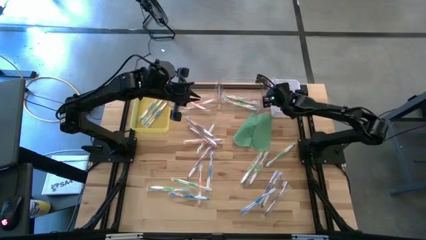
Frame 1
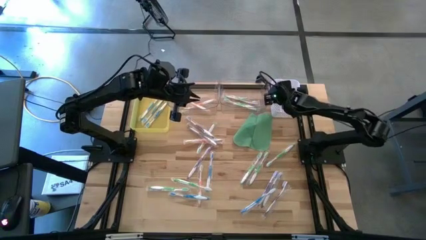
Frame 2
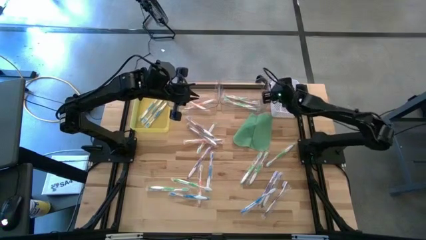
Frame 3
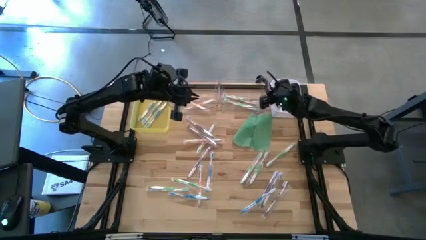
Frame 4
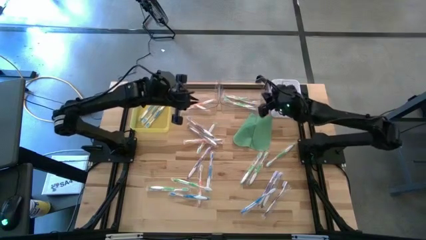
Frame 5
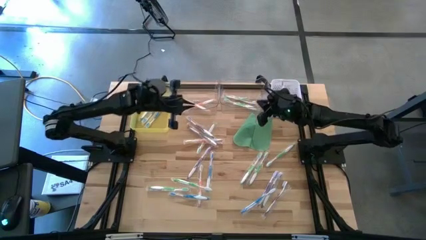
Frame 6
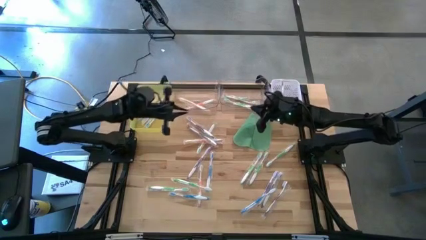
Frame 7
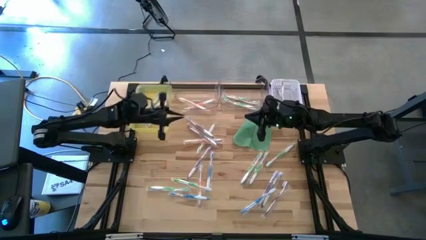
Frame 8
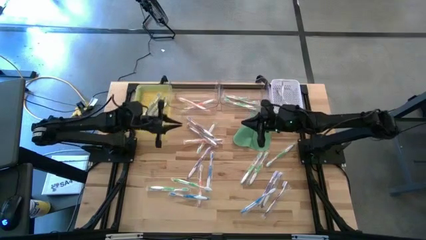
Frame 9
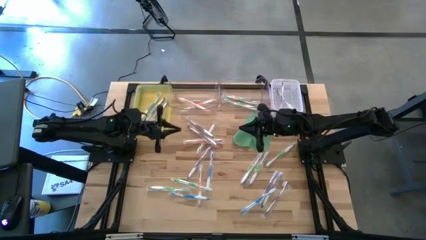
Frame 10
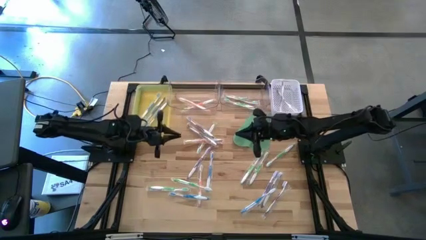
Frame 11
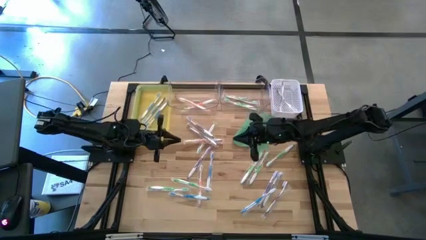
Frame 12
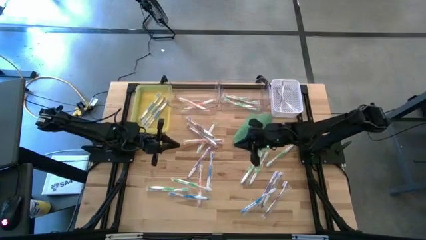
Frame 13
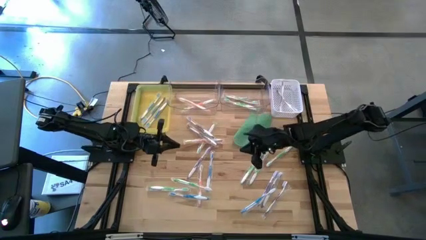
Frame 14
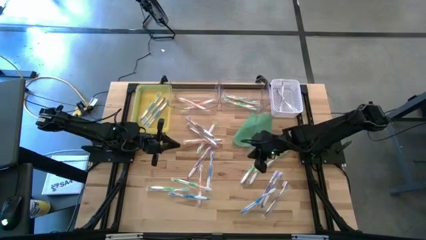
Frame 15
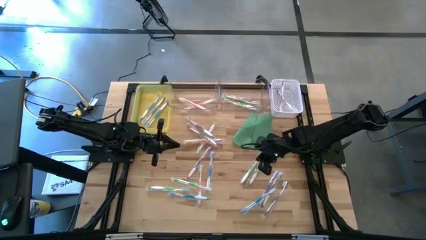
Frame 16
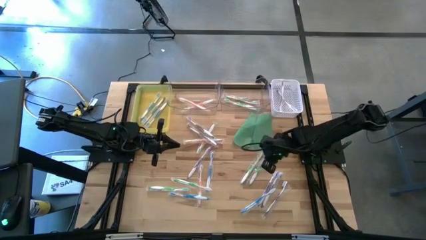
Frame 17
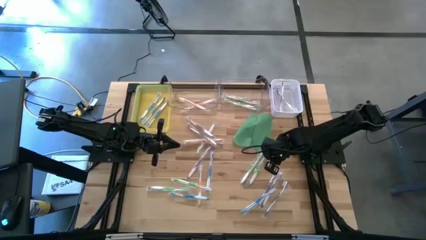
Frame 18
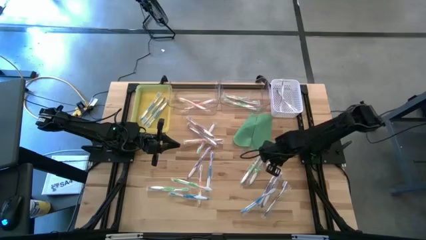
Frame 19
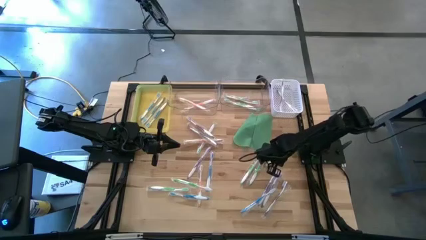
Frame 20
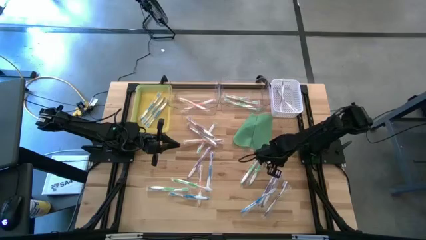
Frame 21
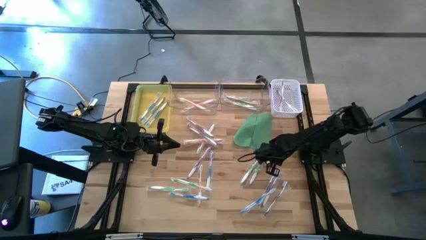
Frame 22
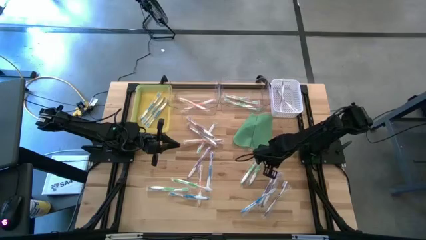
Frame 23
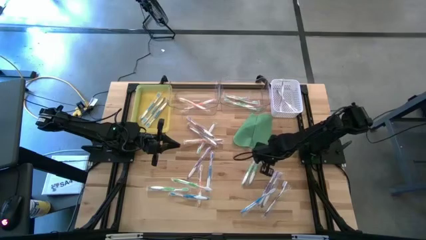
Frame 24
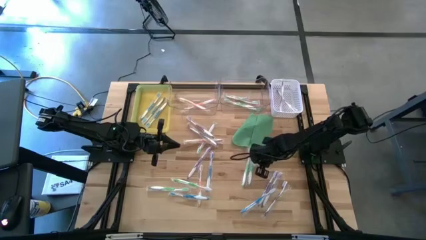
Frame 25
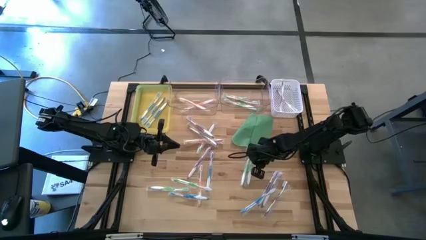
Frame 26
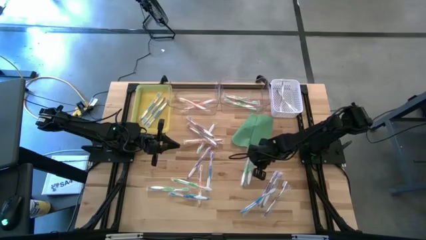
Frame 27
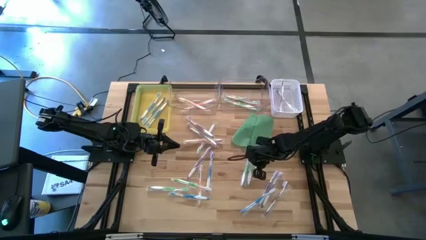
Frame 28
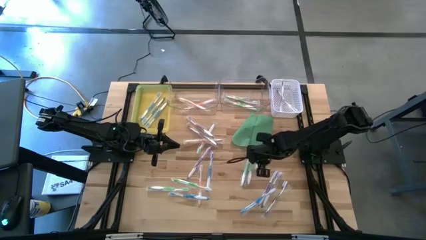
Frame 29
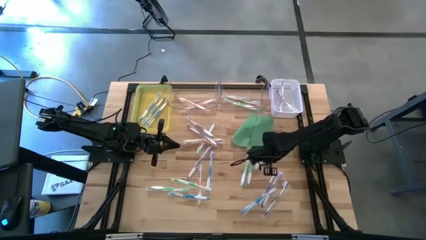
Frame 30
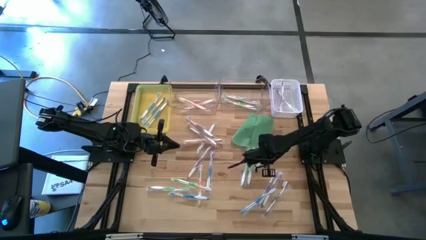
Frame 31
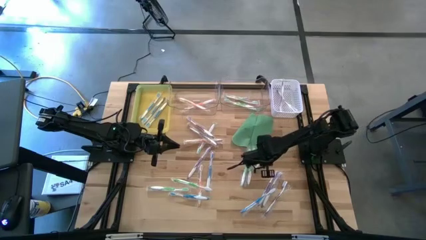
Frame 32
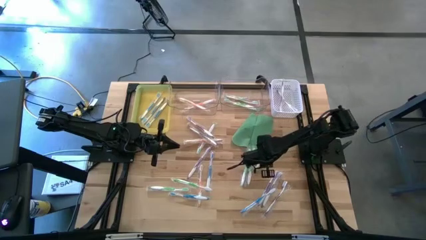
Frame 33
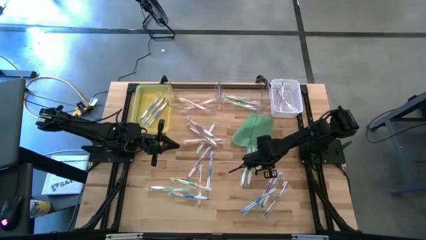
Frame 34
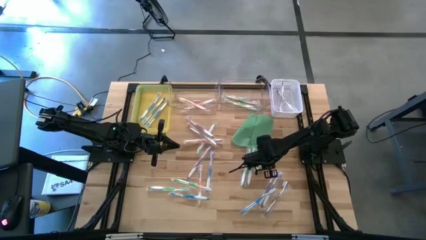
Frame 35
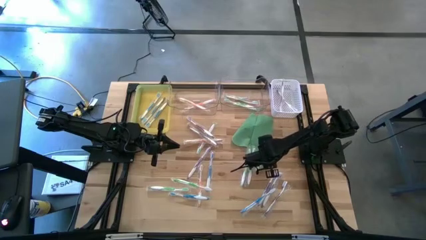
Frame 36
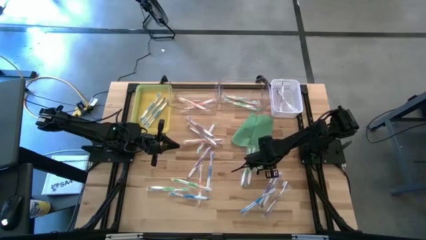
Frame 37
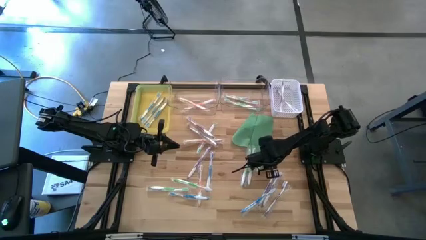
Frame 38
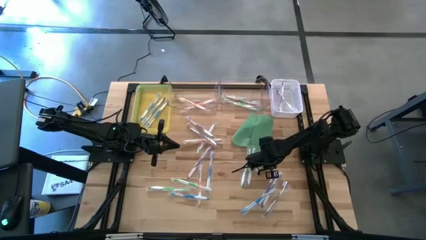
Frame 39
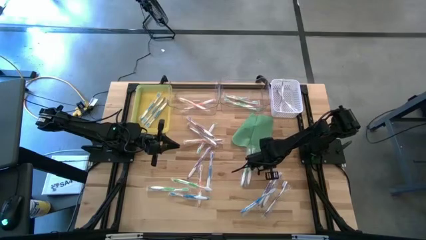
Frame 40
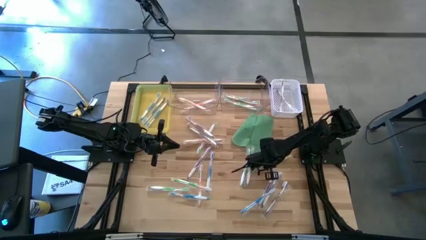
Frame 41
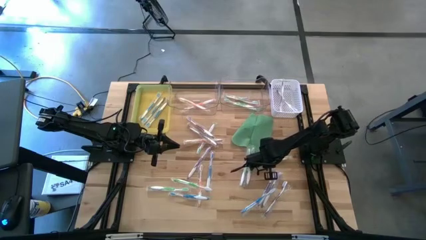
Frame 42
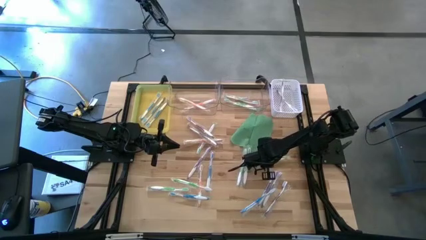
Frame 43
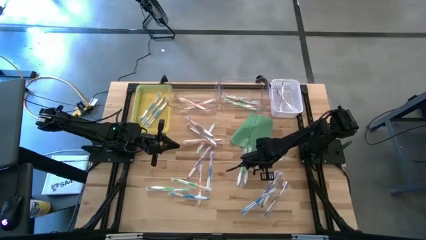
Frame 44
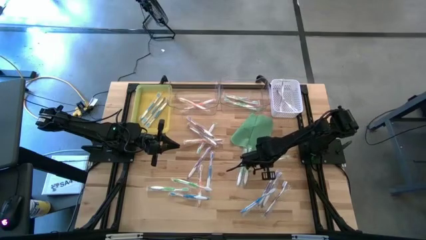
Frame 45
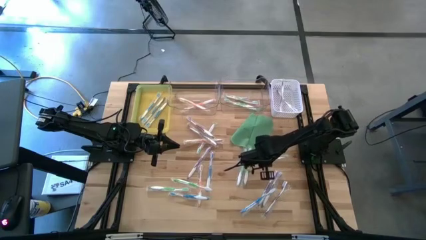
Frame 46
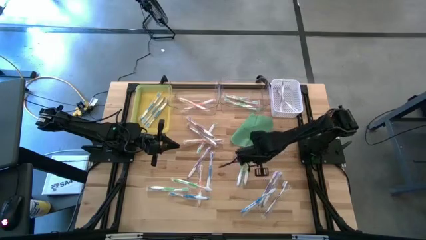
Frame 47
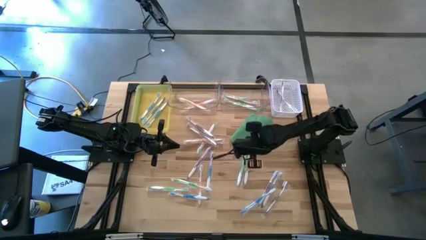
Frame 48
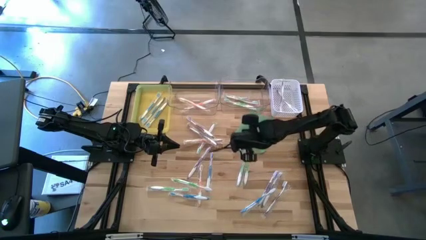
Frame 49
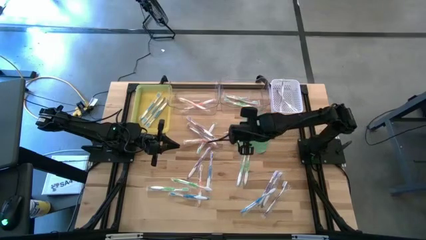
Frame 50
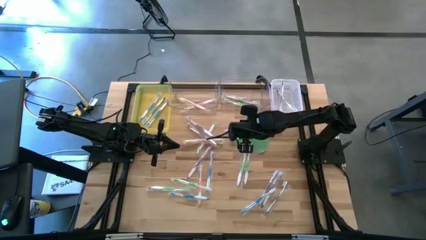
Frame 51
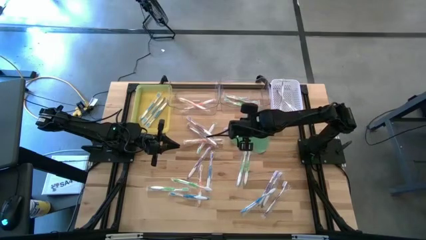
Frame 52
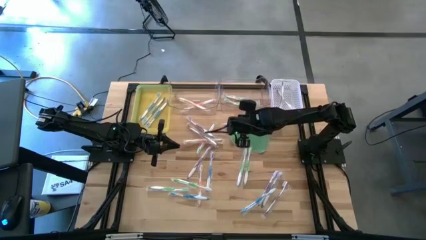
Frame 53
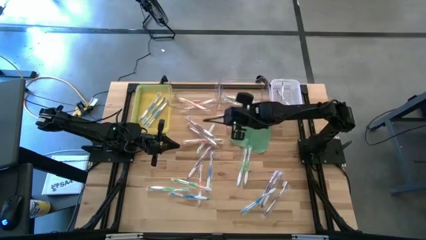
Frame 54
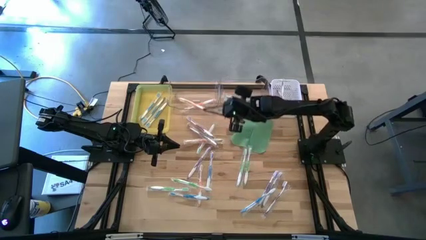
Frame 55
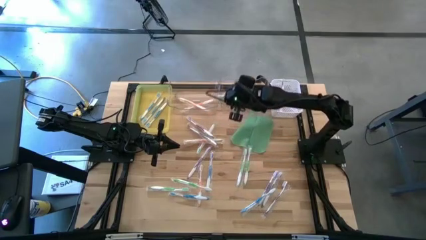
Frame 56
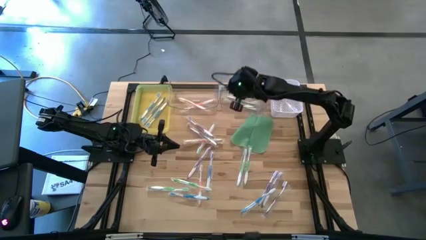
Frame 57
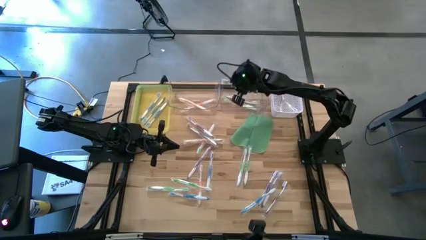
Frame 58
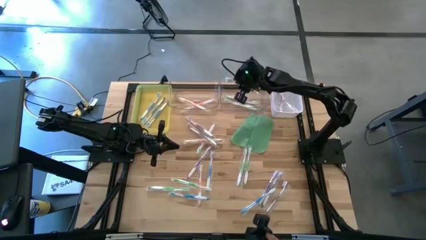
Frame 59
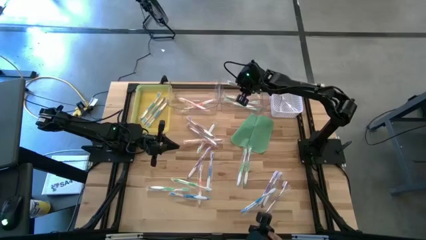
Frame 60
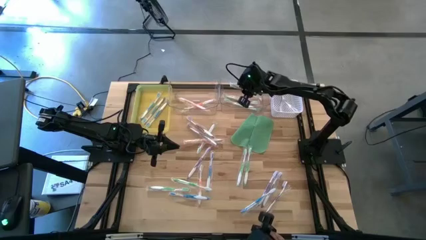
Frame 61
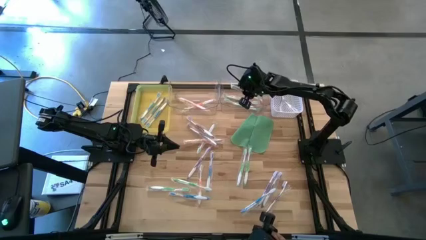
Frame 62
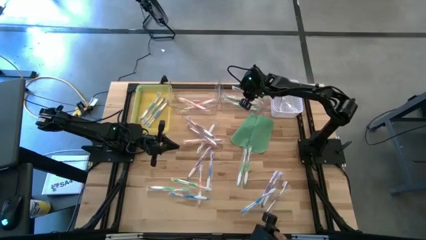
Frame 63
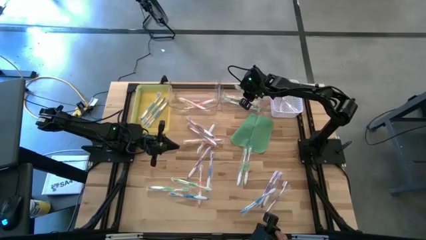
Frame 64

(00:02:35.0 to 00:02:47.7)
Task: Pick & Place Toothbrushes
Put the green toothbrush into the right transparent bin

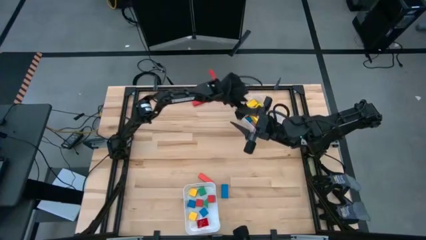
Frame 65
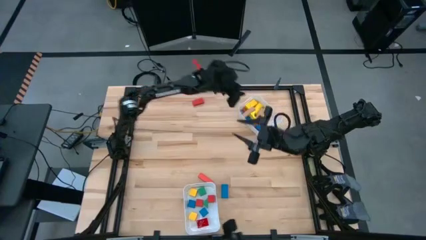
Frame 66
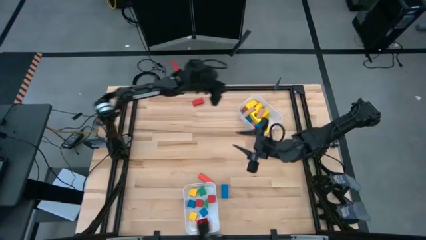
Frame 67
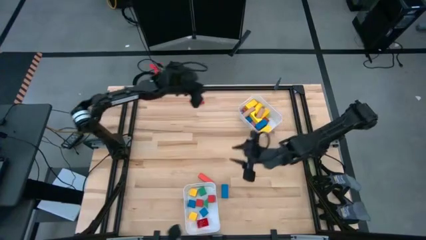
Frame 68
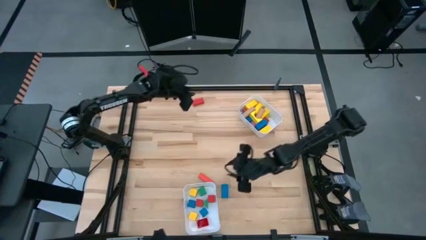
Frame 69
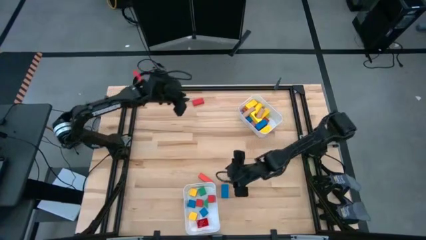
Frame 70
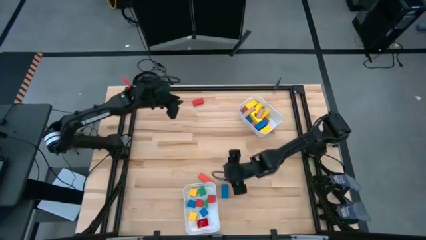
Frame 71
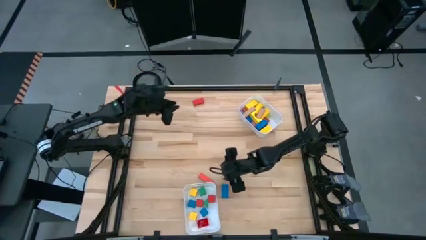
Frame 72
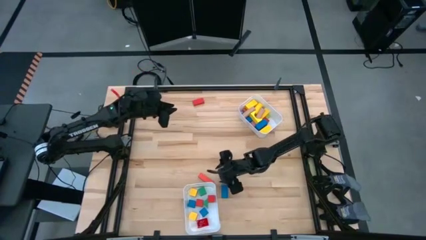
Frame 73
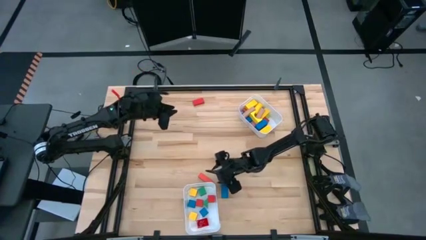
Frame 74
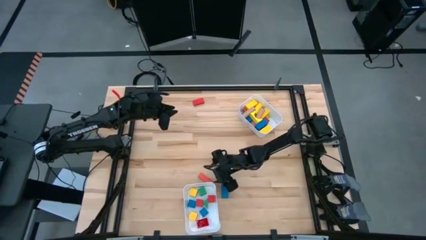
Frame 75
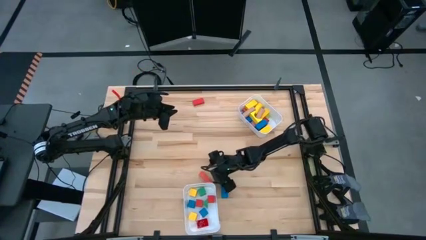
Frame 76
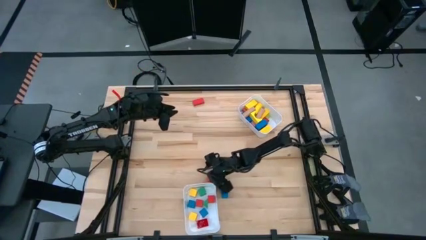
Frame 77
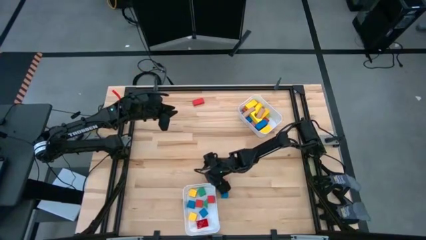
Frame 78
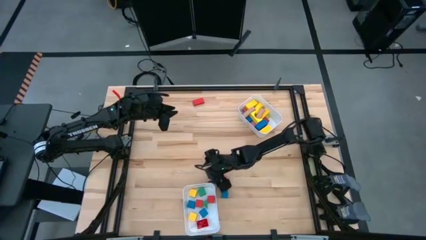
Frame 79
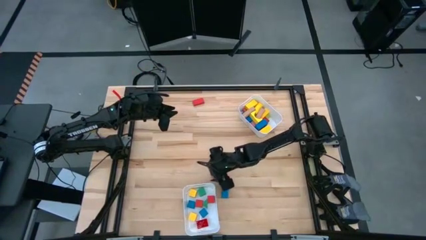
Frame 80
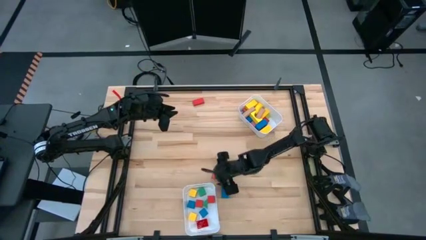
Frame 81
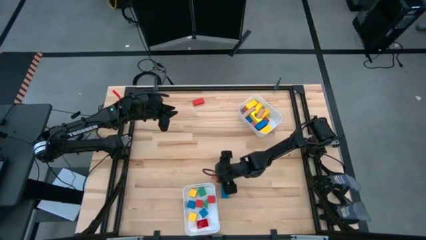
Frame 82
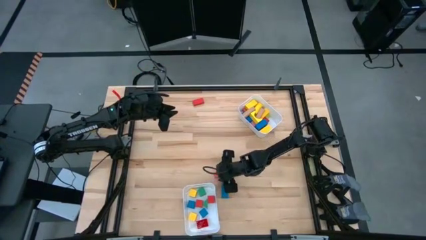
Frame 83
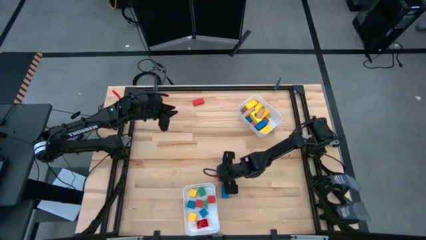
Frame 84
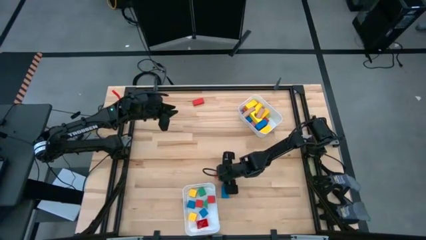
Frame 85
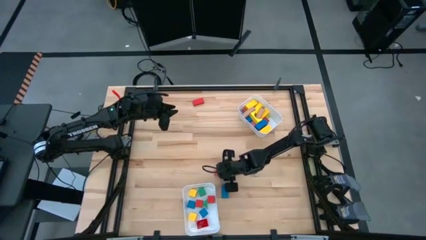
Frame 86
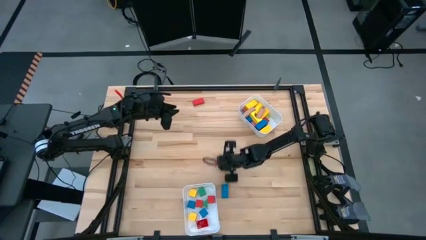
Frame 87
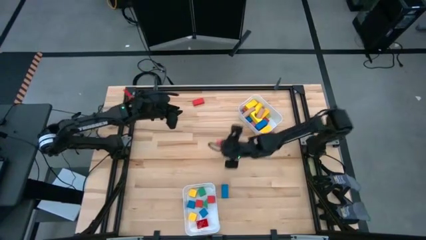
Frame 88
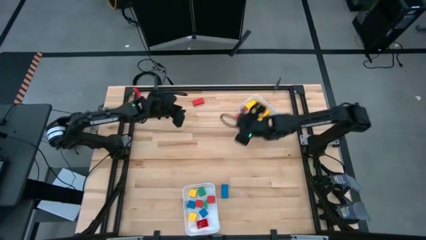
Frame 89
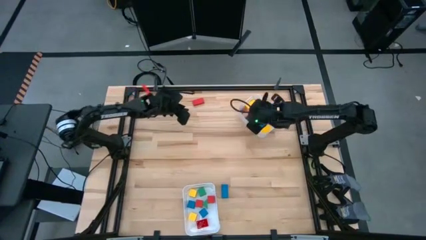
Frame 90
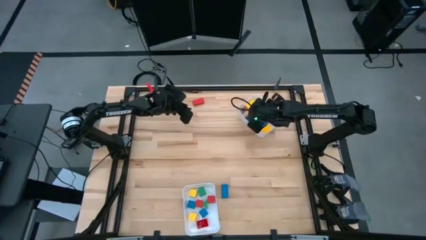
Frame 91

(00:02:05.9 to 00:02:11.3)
Task: Sort blocks by size
Put the red rectangle block into the top white bin
